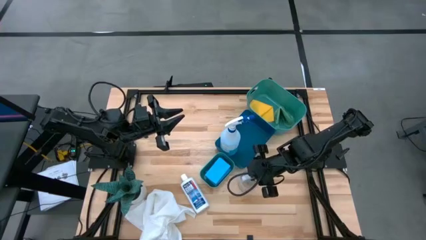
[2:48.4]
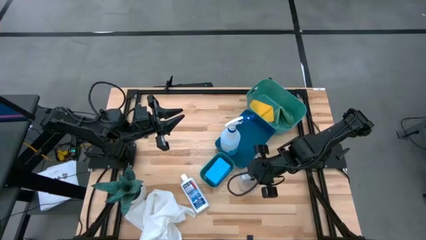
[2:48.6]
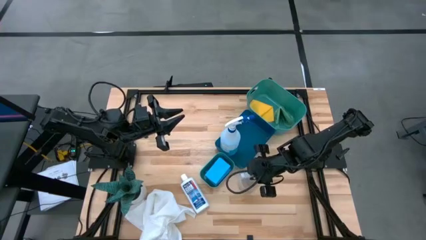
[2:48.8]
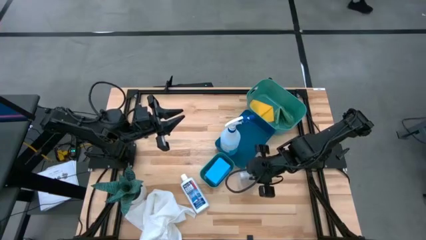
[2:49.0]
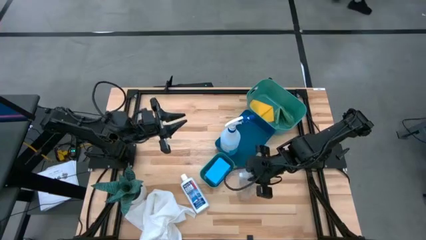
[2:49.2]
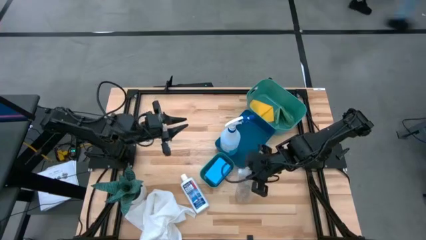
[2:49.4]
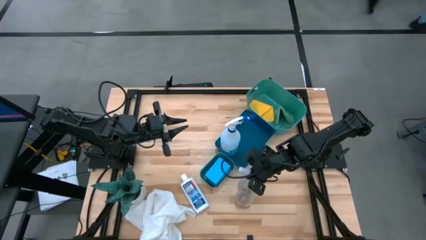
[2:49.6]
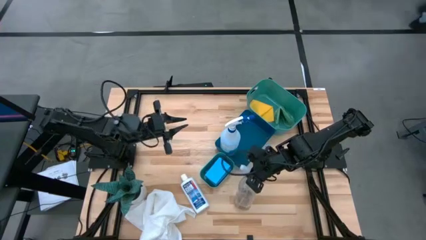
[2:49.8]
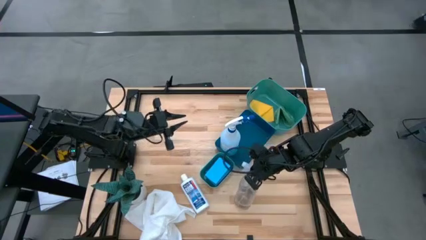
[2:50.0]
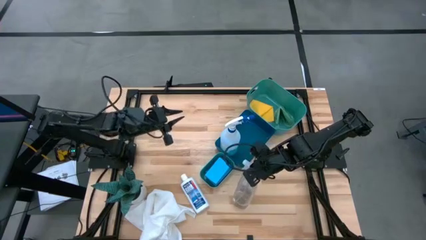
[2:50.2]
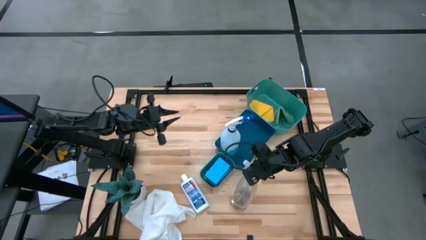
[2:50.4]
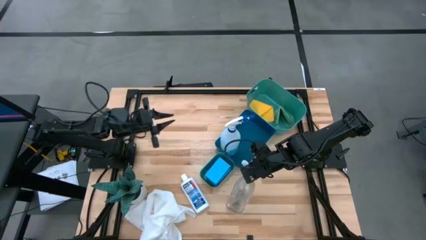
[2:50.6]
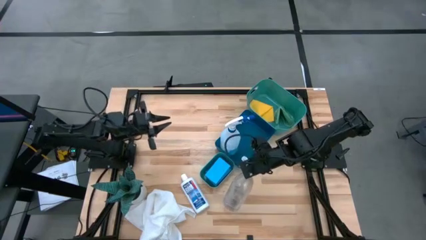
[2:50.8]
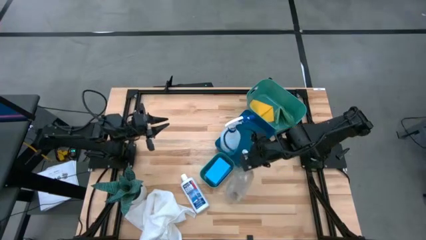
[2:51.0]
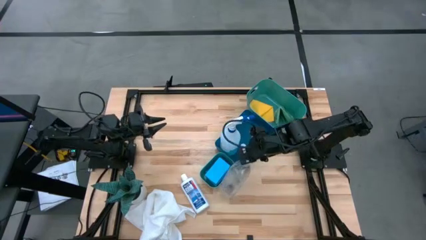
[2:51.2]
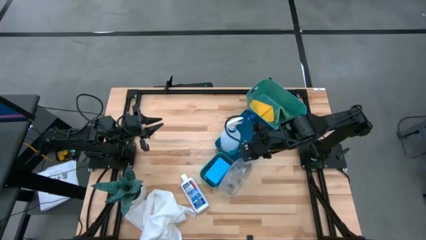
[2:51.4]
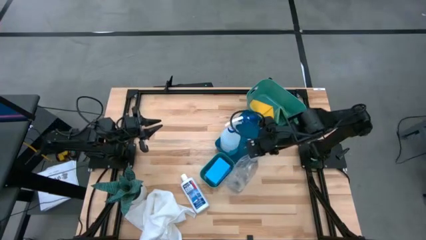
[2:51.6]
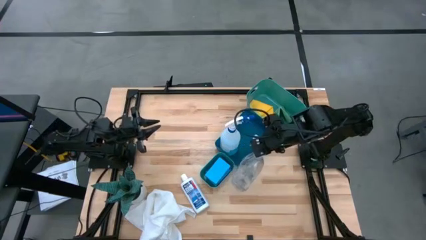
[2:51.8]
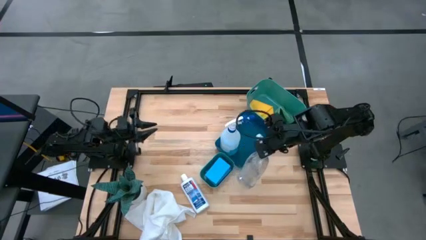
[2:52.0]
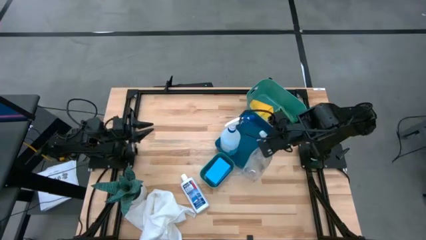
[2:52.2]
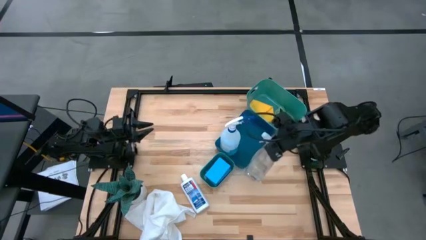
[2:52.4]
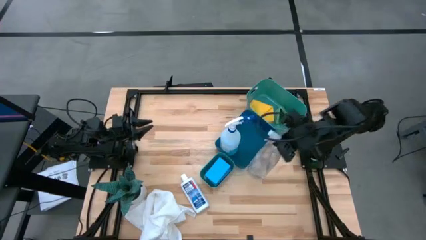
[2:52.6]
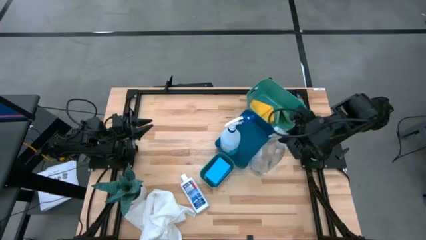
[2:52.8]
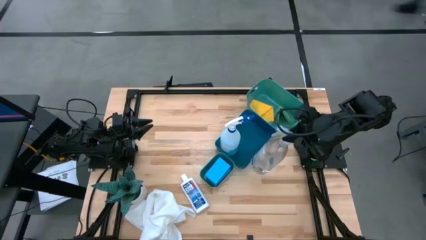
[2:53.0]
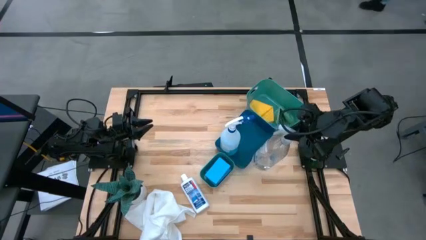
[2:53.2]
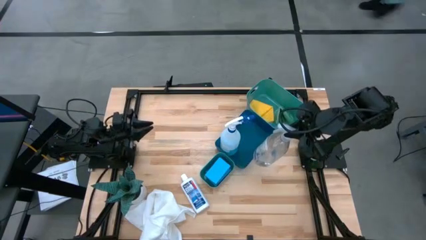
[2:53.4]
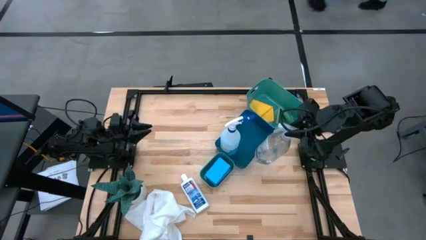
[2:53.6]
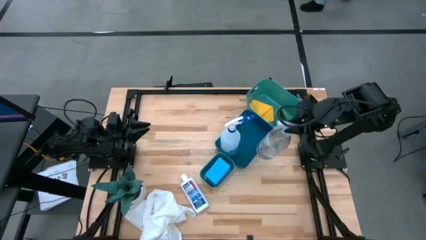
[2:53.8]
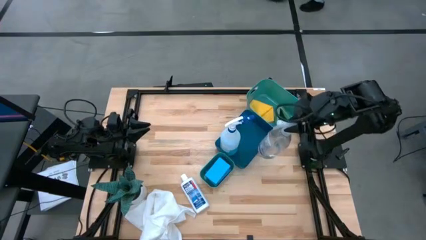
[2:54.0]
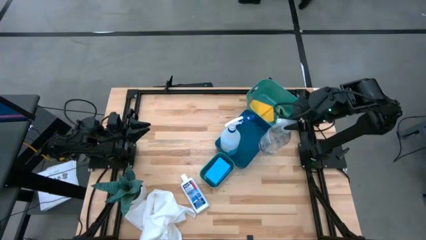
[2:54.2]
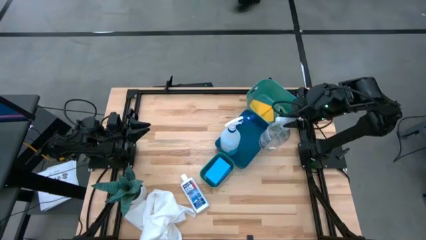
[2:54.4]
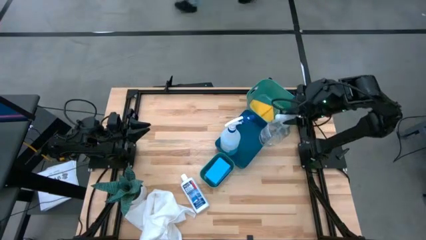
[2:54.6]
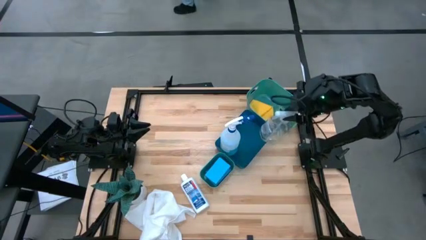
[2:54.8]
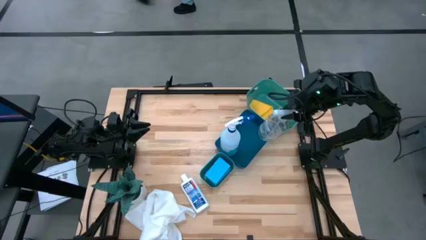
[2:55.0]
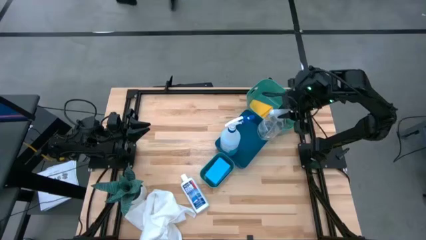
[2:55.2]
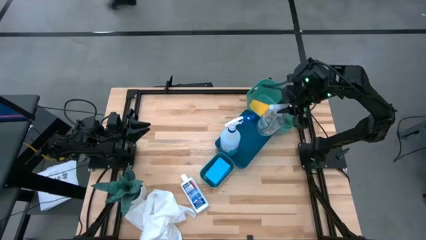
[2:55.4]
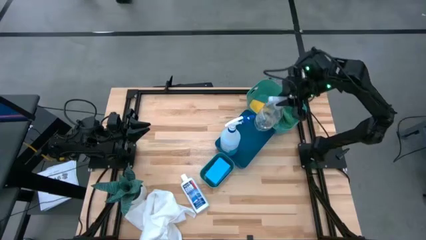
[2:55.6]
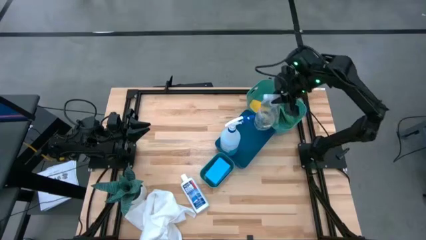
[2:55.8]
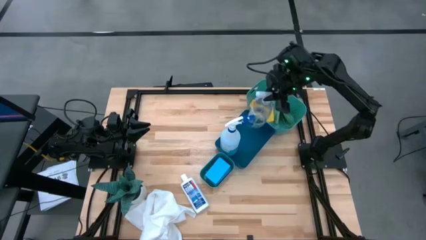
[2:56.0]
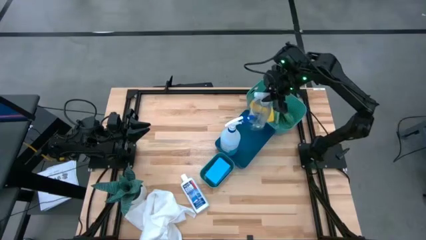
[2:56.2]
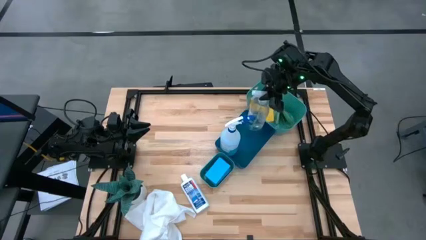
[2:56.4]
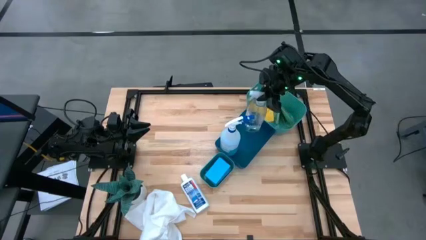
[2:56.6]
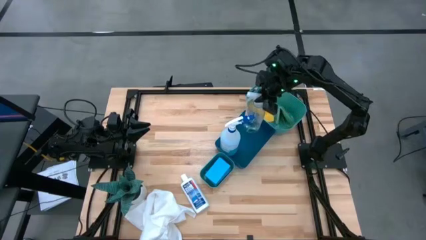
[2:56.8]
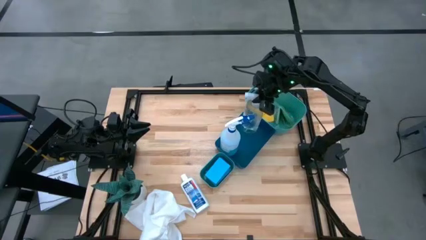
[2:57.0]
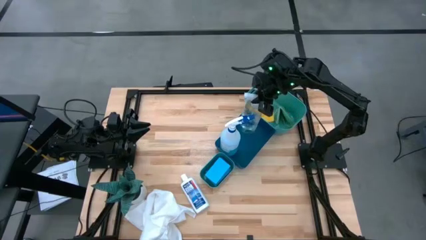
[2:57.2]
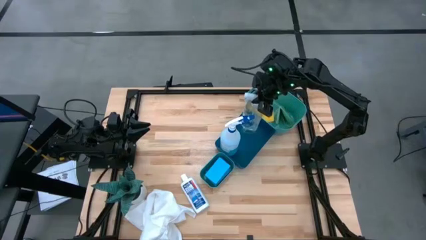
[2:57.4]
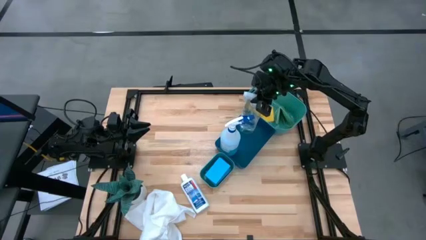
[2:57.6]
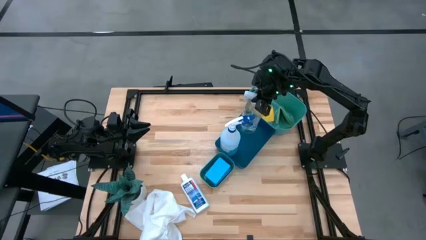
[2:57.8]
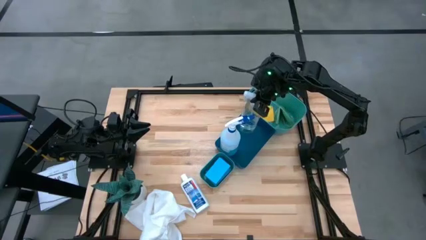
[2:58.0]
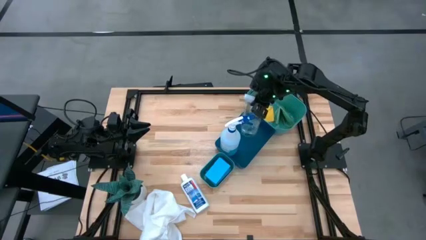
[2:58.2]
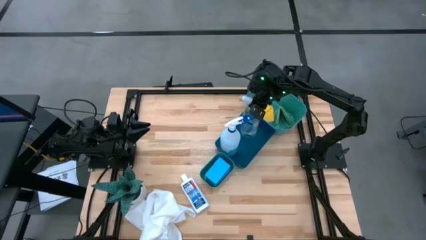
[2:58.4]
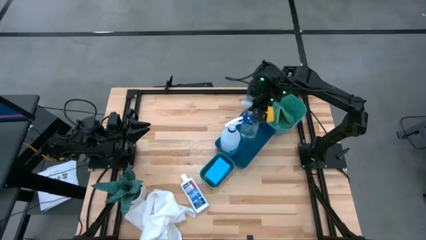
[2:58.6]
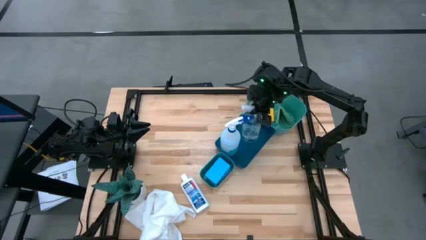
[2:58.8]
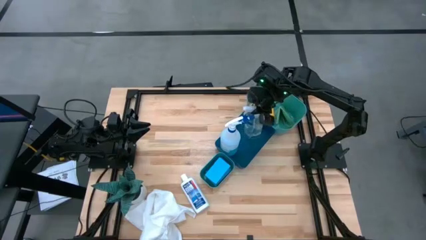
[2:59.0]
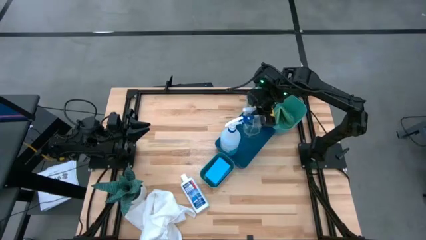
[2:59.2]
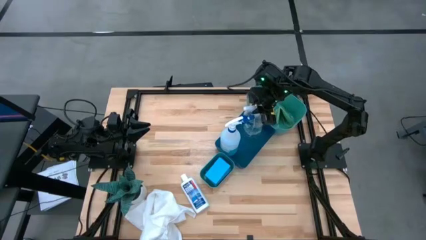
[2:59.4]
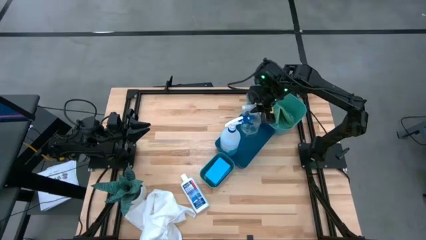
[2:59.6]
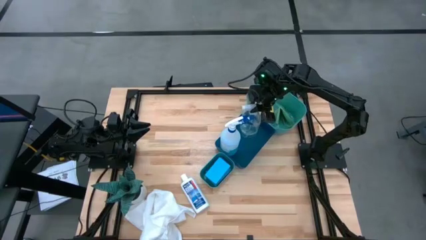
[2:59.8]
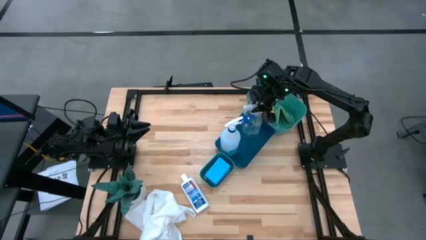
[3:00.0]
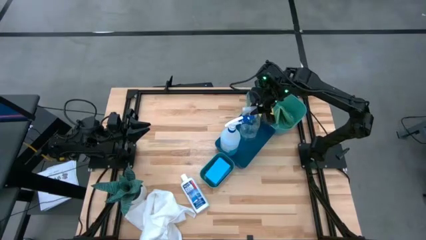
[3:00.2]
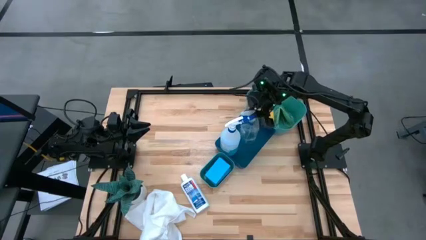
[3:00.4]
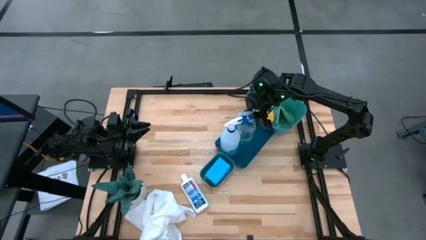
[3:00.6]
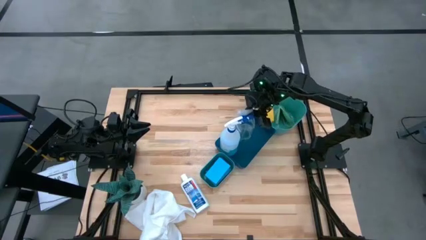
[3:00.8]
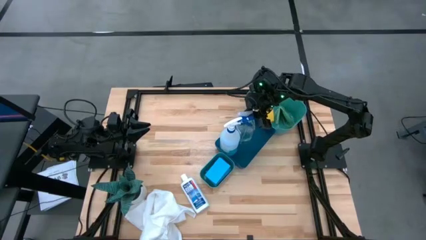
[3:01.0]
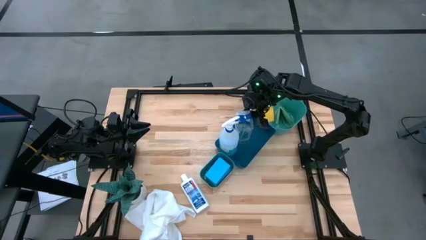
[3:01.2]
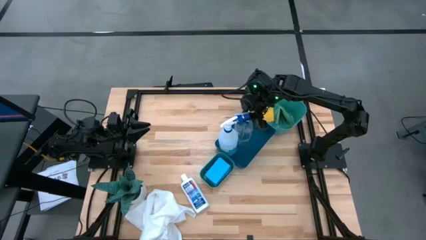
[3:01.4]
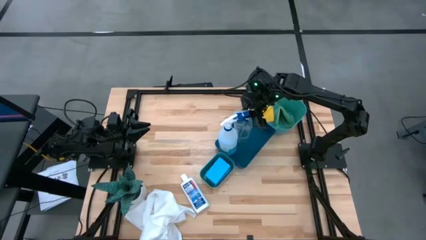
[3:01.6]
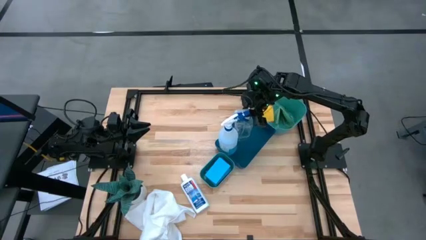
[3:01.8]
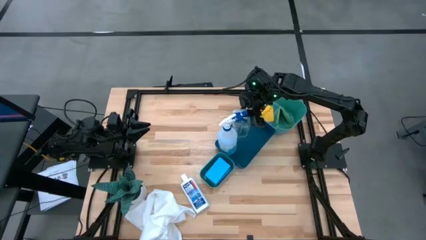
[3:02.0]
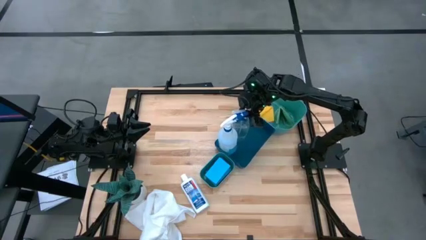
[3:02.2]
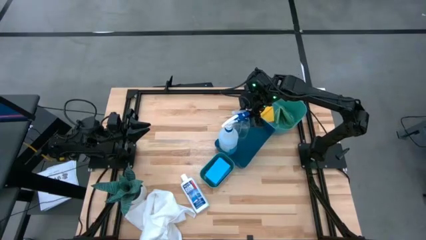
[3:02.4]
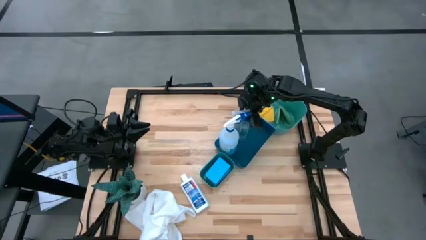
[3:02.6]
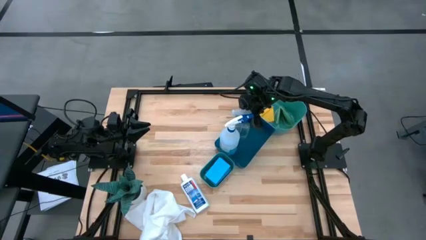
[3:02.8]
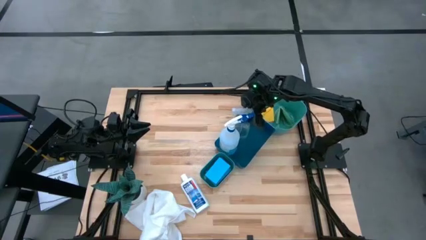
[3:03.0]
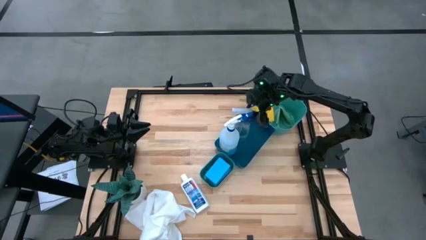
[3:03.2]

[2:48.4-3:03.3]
Task: Pick & Place Kitchen Items
Put the transparent spray bottle into the blue bin
